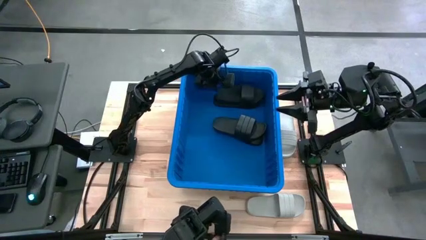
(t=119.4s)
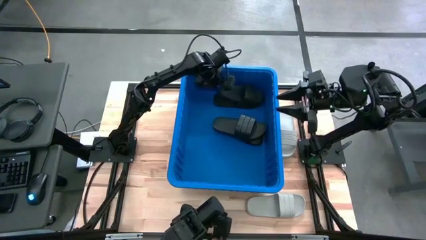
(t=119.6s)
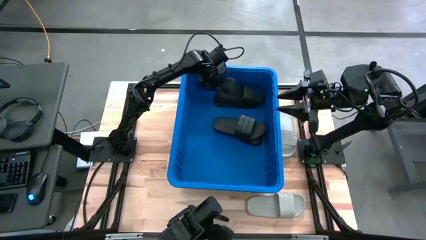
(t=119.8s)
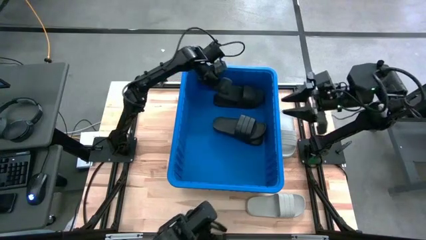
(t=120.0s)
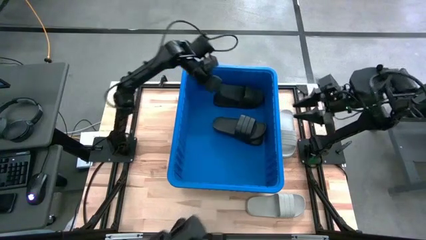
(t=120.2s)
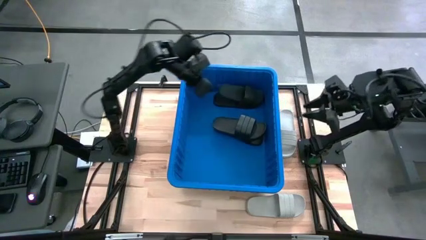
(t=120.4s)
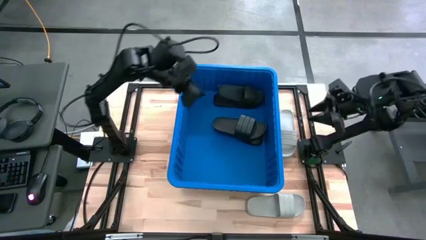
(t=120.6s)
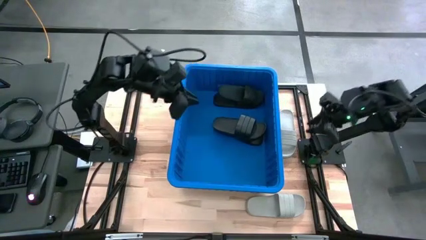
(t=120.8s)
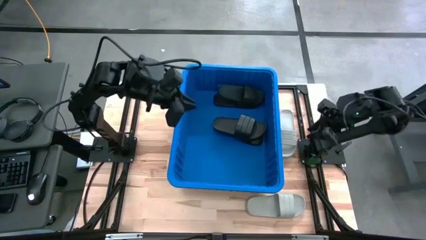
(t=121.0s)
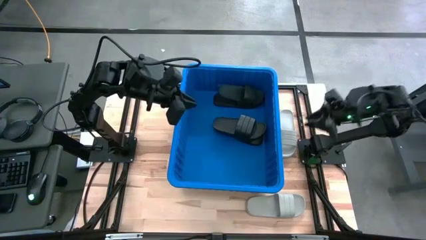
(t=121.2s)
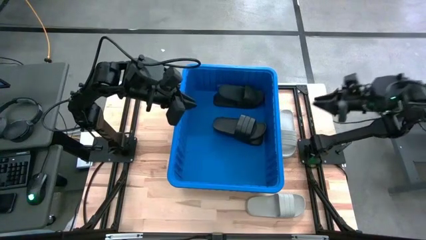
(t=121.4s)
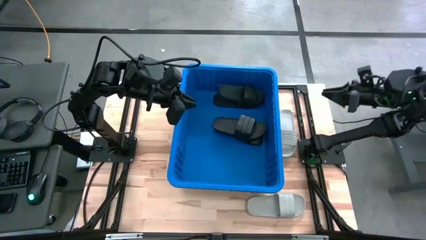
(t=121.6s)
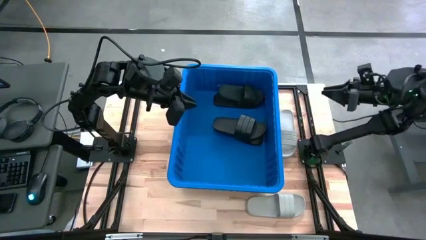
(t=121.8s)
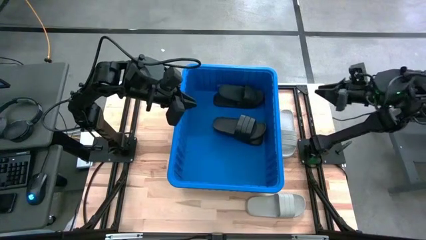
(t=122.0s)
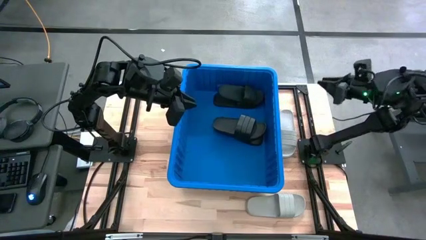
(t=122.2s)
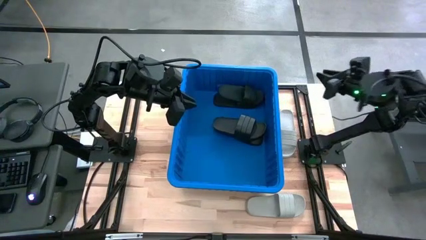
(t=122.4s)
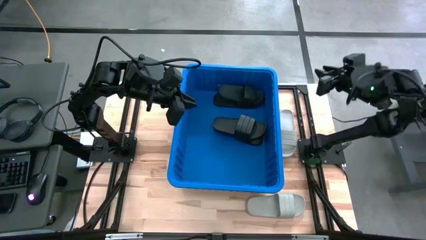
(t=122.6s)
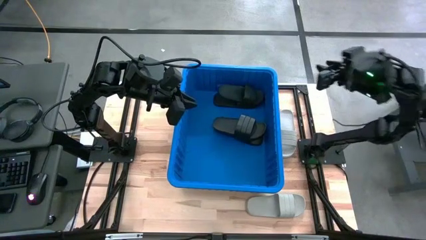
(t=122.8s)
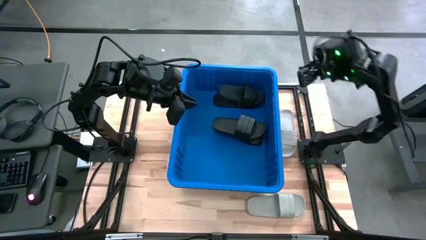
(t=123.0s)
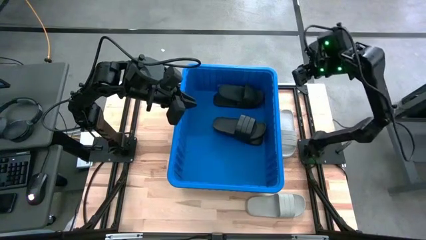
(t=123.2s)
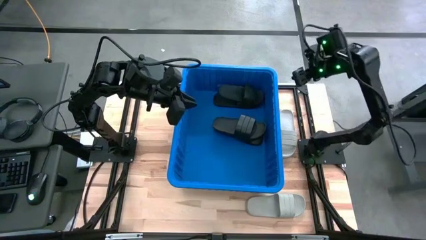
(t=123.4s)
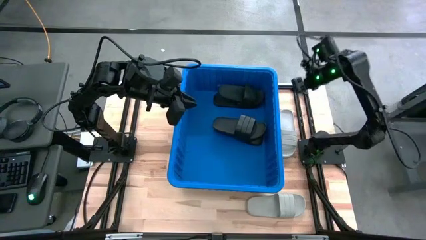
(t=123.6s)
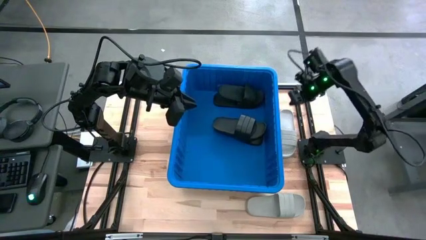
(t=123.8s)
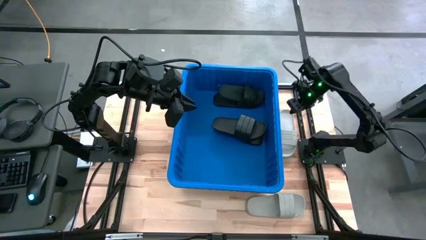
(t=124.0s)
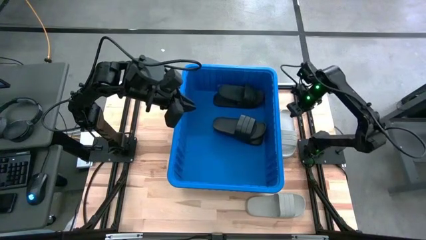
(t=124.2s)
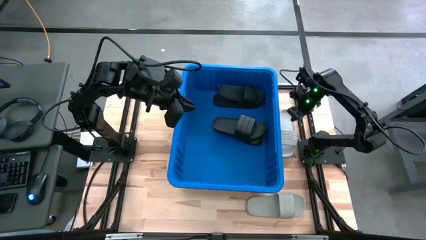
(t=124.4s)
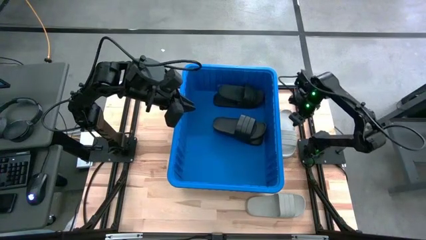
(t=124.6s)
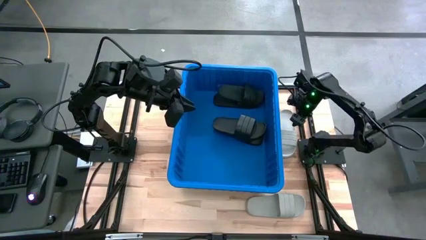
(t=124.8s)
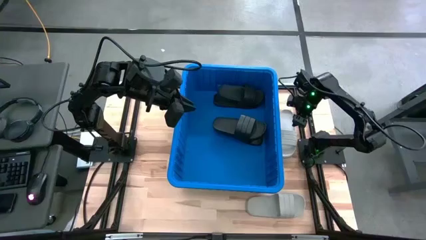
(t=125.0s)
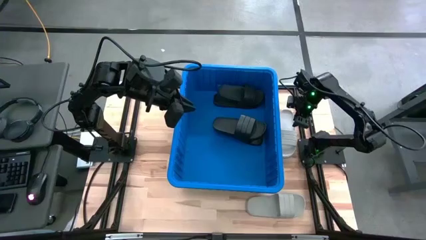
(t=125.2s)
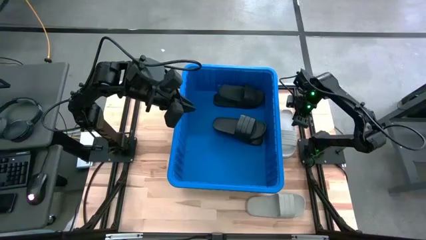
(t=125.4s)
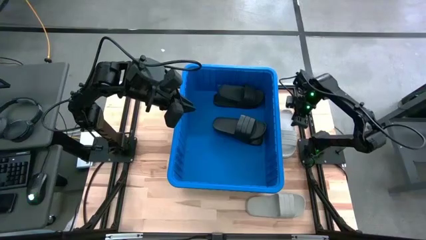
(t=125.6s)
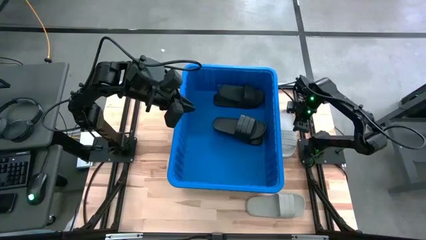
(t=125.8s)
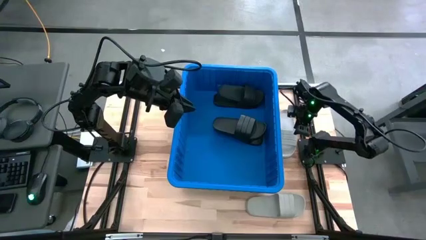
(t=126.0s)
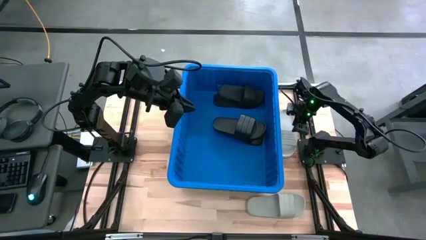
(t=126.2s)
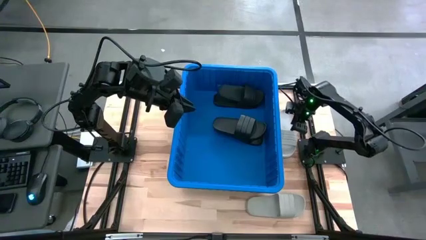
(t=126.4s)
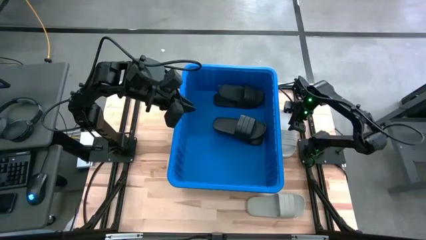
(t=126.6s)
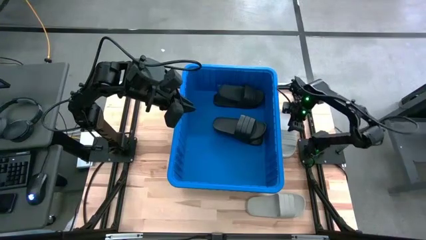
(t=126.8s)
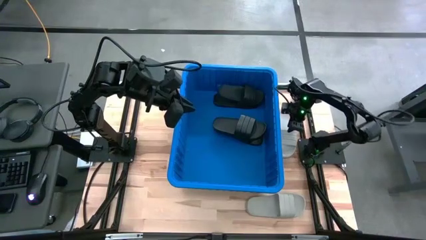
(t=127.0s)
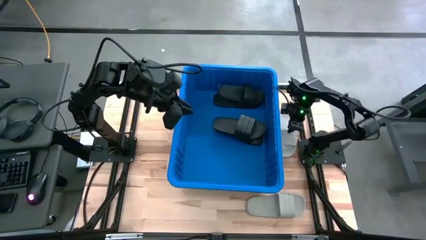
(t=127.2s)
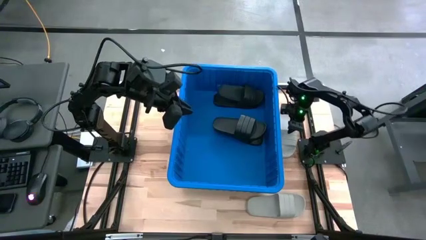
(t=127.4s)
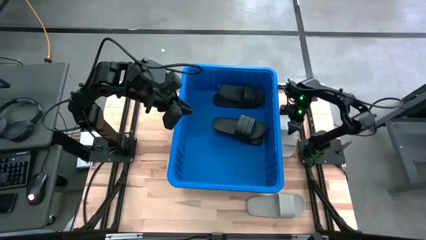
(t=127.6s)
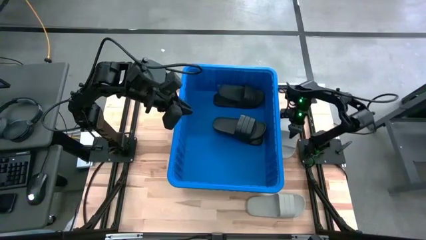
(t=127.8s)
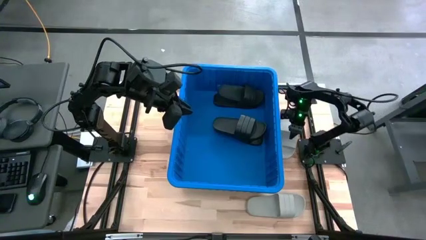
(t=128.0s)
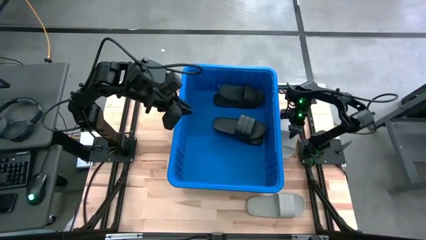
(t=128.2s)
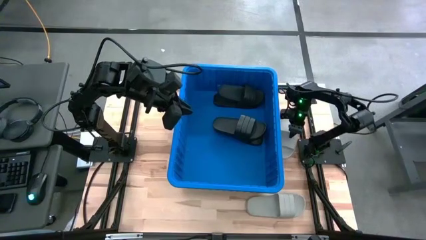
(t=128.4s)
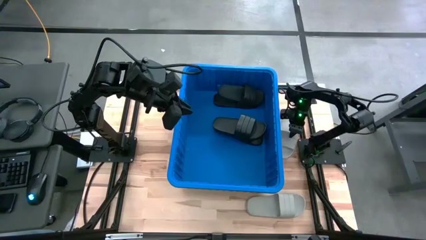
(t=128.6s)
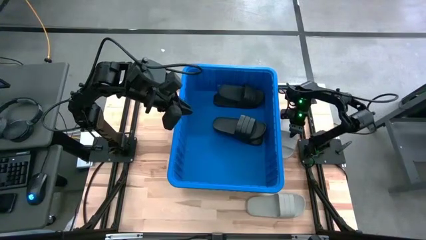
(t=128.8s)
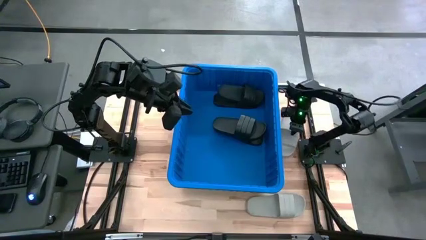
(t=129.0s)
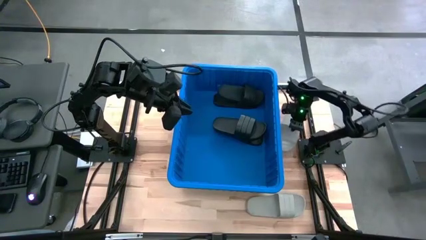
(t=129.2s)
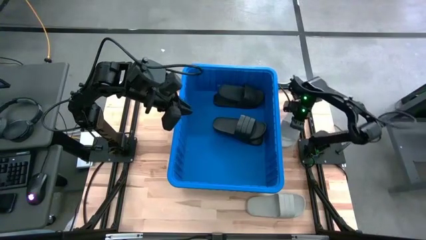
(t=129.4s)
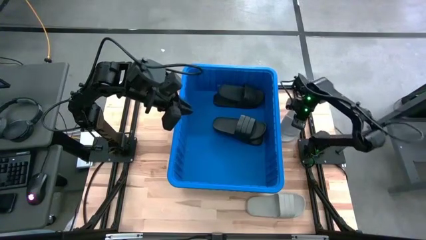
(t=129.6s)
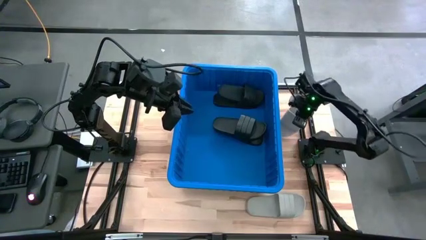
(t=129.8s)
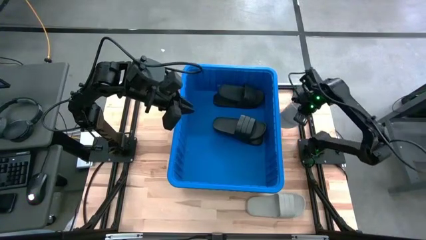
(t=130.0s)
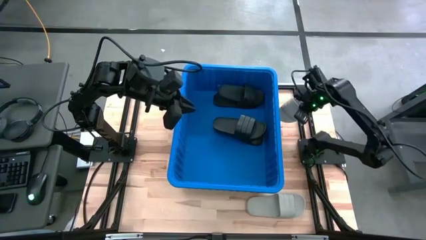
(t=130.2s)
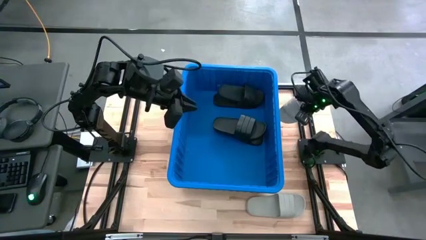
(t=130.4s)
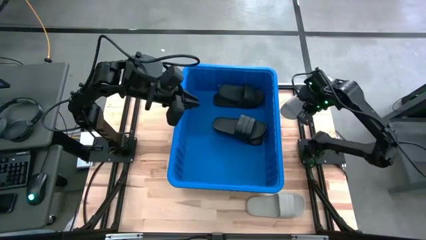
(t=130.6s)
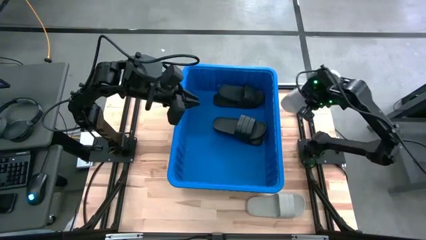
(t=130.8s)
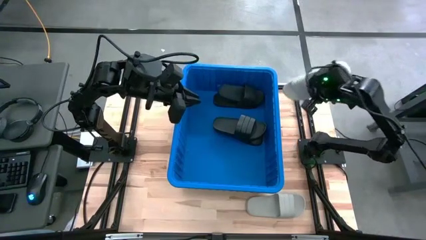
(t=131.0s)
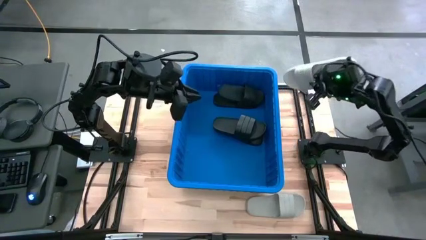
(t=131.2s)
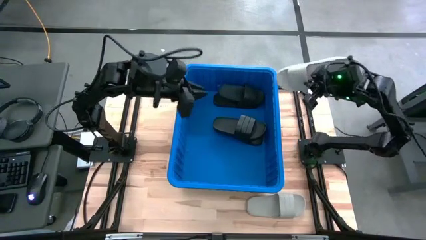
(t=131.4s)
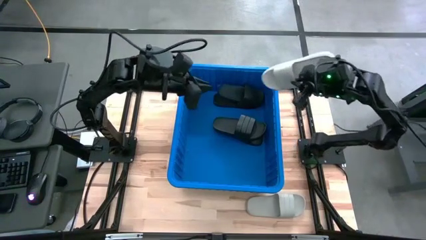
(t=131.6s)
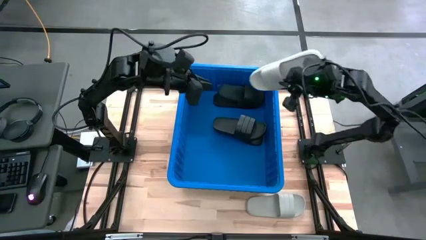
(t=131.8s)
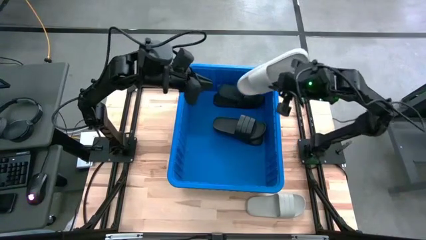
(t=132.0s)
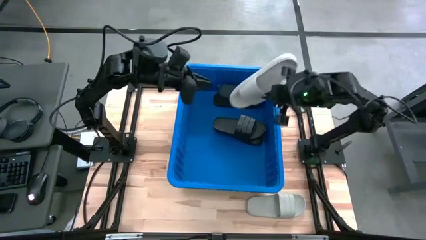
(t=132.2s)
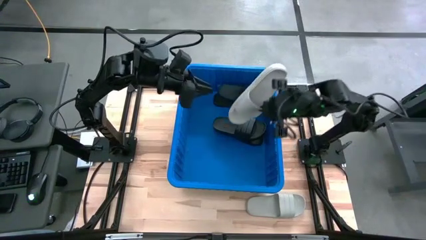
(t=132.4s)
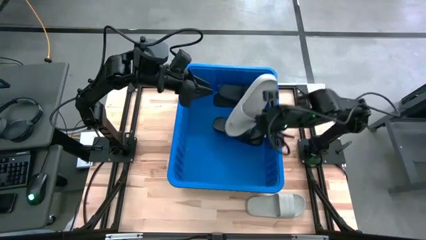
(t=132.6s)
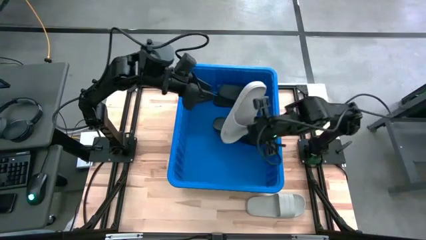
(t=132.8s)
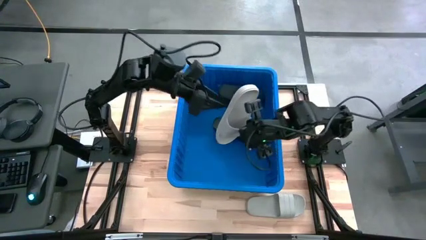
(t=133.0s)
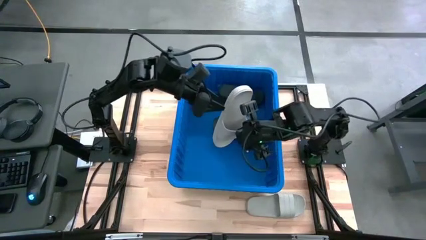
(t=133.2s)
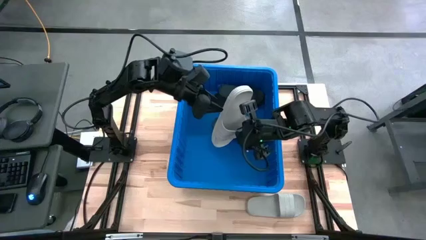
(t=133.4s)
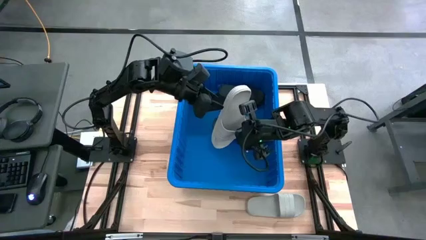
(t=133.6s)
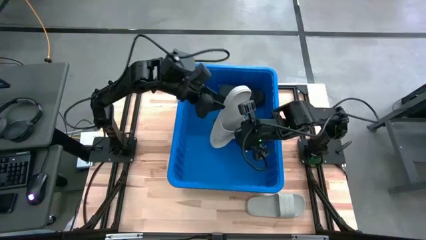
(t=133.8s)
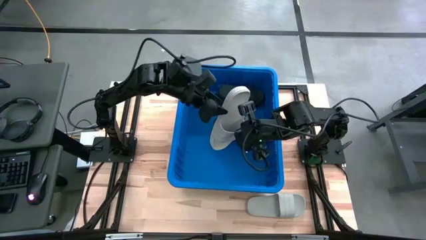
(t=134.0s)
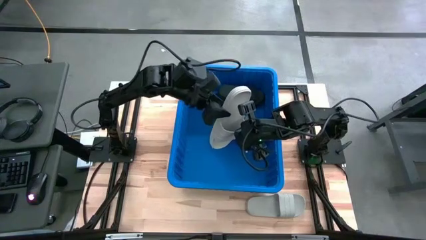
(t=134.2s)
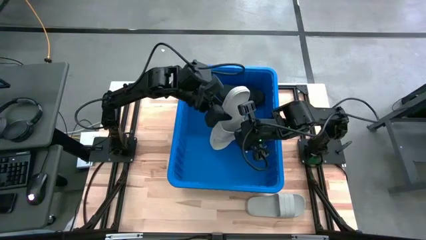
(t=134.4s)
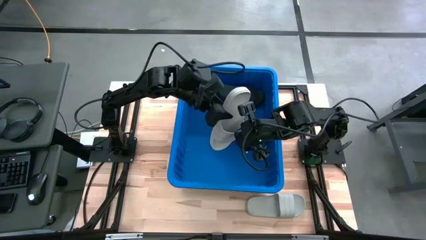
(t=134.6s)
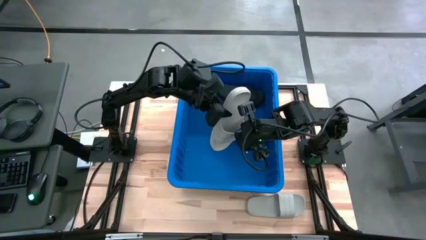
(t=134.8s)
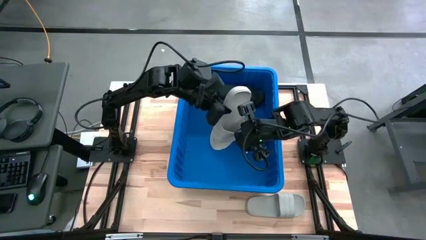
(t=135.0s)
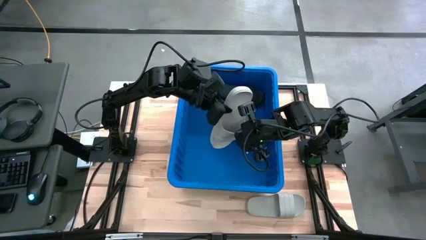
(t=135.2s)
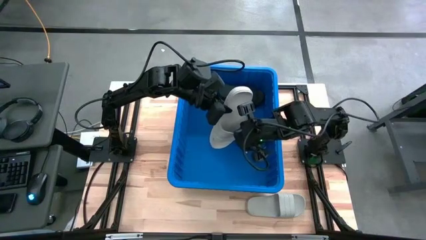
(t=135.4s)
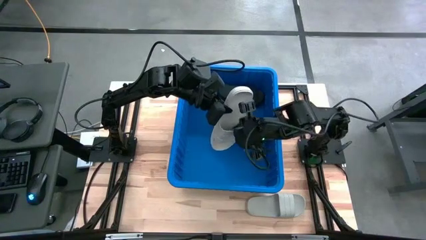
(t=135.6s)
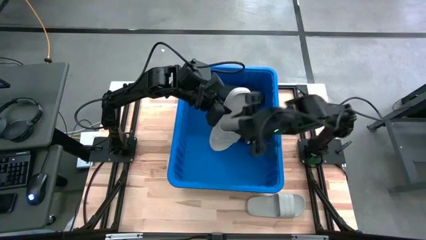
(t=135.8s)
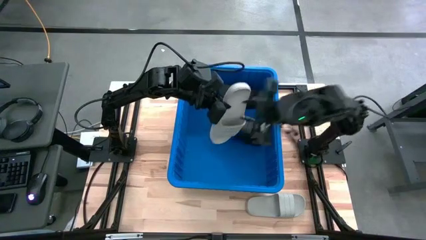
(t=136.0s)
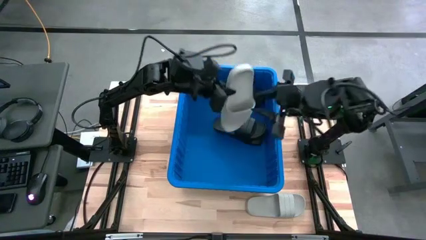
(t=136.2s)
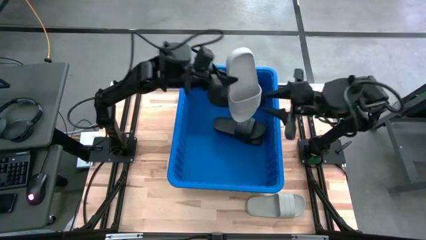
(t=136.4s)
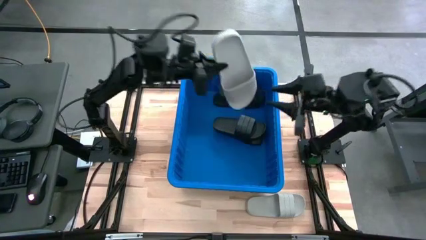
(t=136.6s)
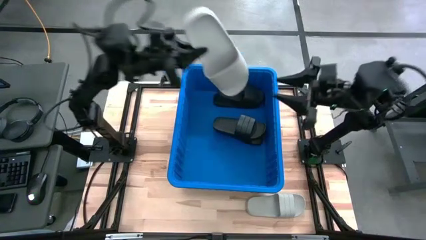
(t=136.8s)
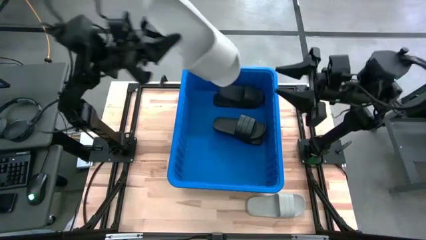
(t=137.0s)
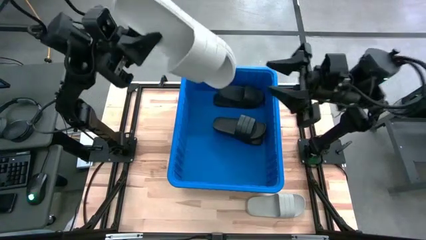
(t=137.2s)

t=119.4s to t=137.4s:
Task: Pick and place slides into bin
Put the gray slipper into the blue bin
